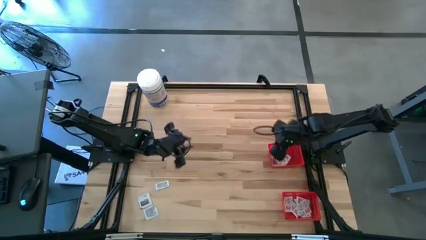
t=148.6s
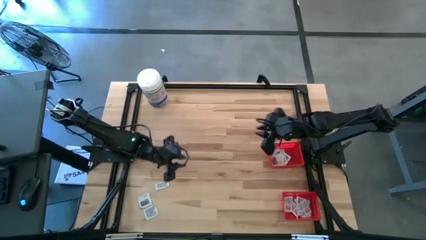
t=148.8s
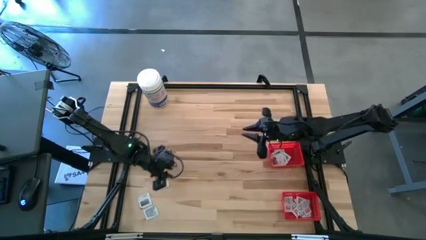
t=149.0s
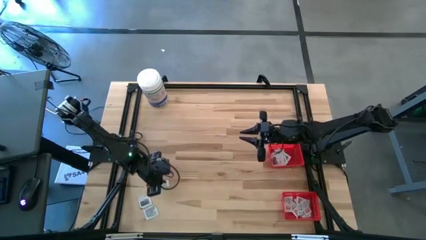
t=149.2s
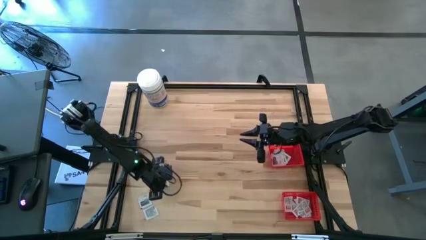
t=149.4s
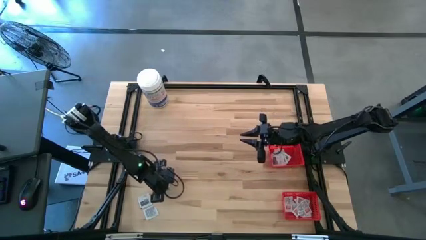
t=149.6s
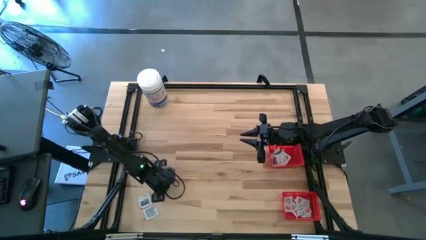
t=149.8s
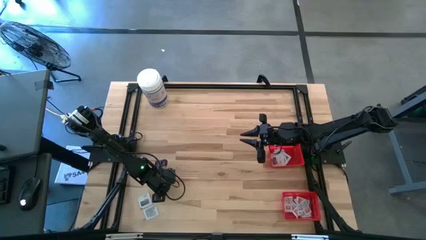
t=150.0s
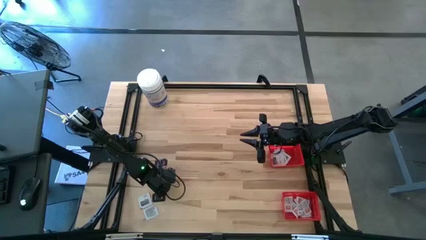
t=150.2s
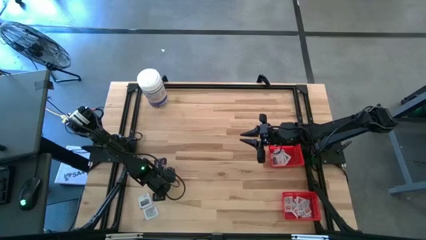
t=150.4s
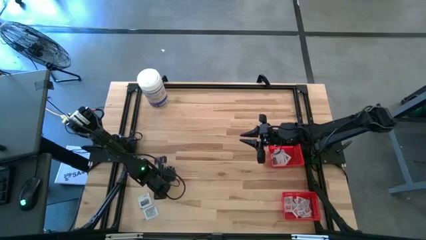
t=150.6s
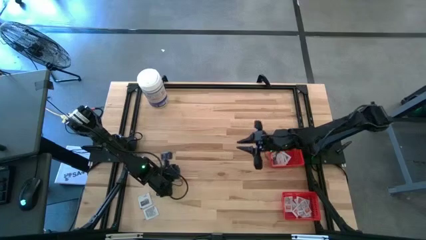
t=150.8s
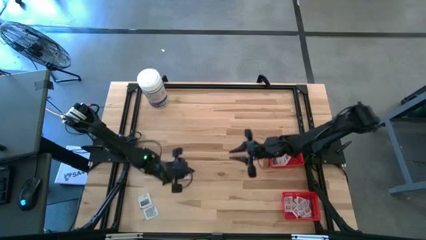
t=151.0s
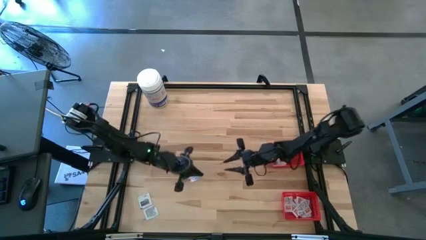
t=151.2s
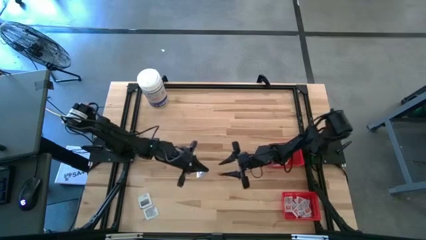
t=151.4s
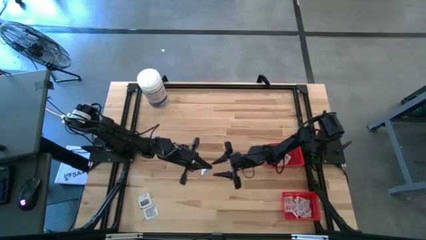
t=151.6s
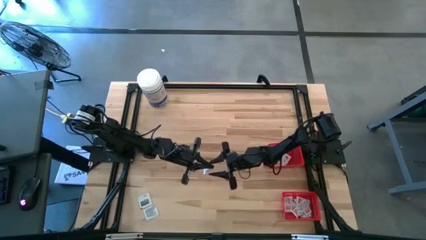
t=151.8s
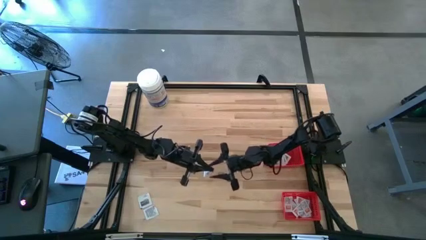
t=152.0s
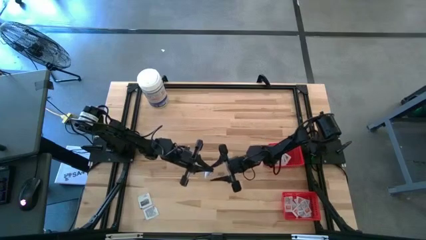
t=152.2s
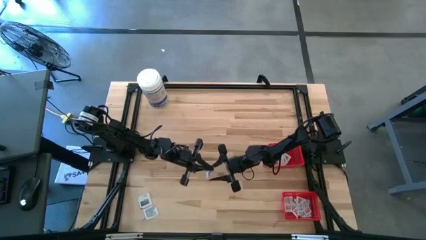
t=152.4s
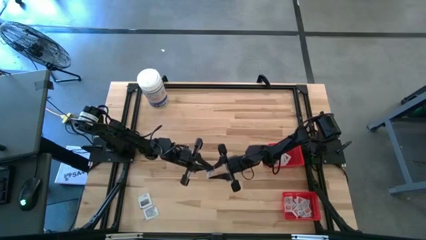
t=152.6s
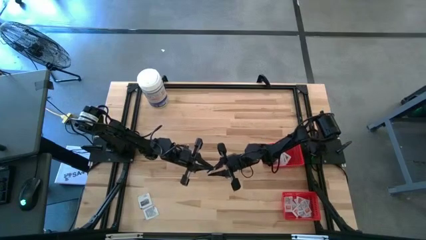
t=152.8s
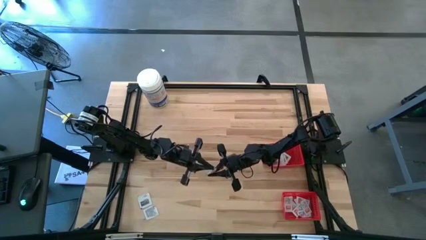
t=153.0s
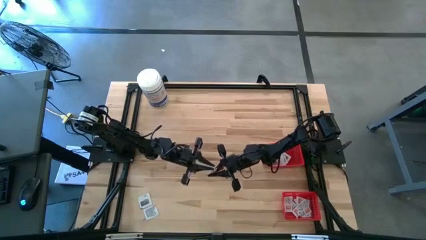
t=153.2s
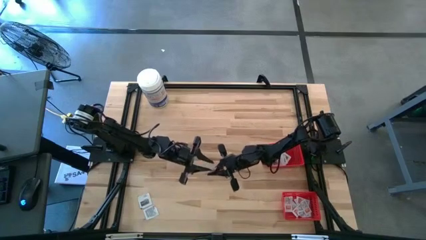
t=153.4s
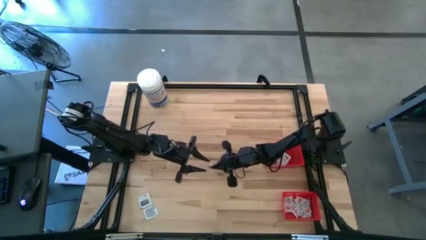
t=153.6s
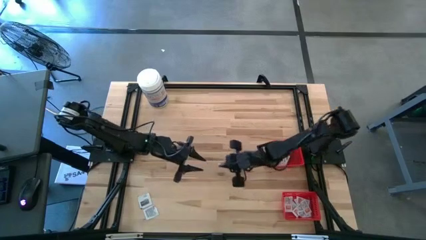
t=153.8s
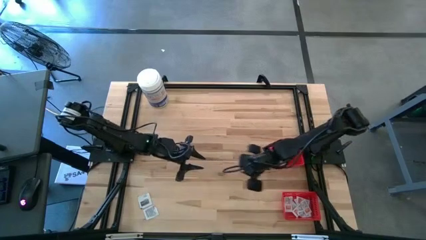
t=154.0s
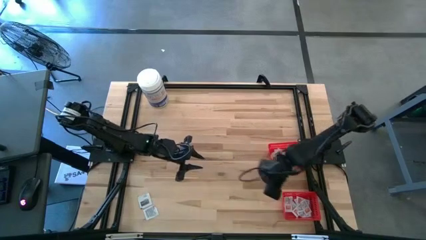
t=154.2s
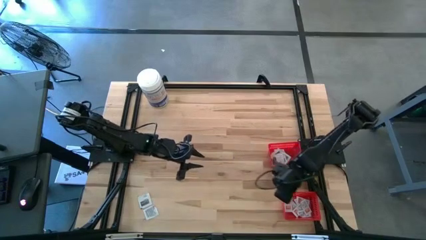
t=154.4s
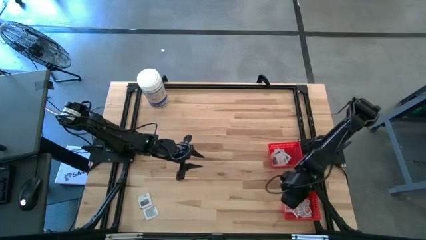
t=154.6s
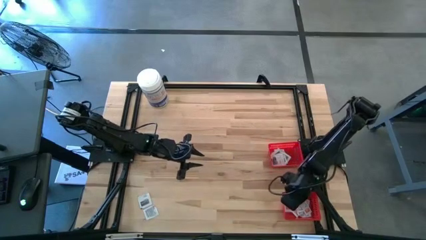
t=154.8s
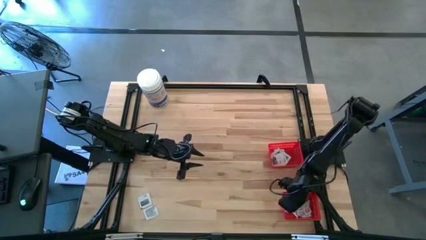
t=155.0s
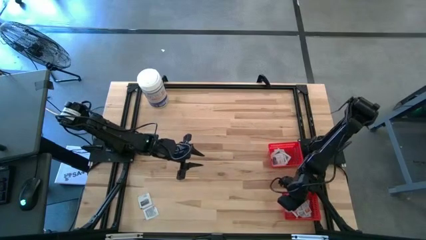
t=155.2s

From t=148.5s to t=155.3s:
Task: Pick & Place First Aid Supplies
Put the orange ointment pack into the bottom red basket

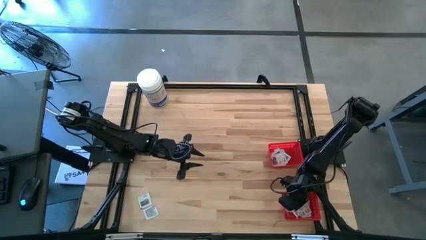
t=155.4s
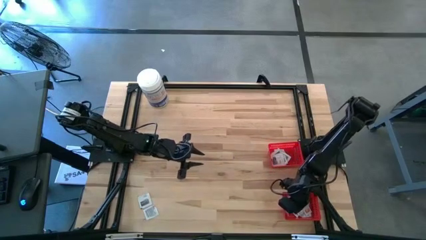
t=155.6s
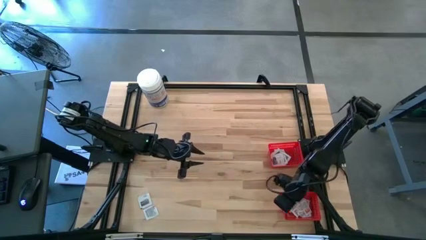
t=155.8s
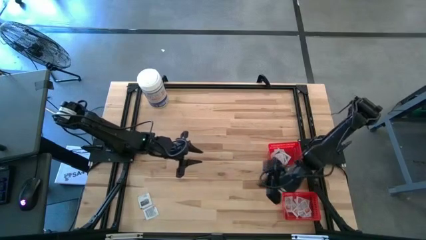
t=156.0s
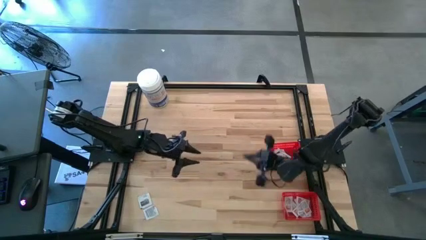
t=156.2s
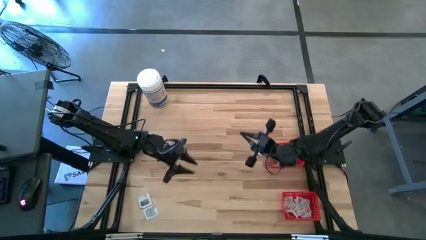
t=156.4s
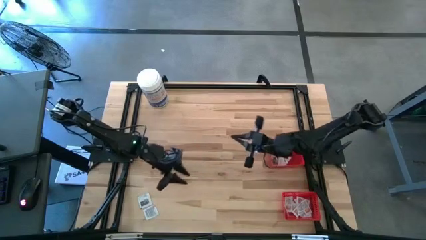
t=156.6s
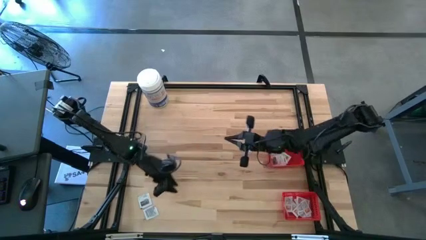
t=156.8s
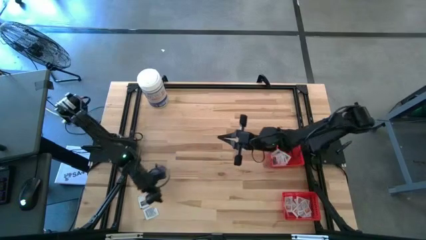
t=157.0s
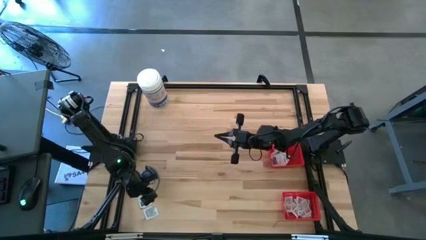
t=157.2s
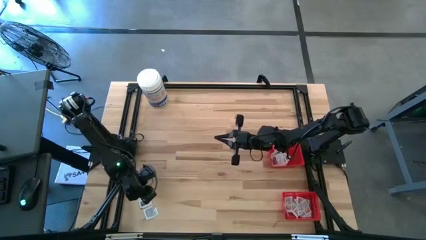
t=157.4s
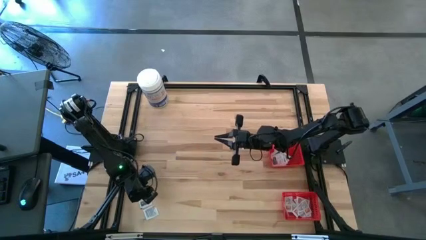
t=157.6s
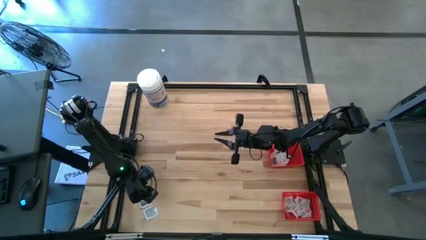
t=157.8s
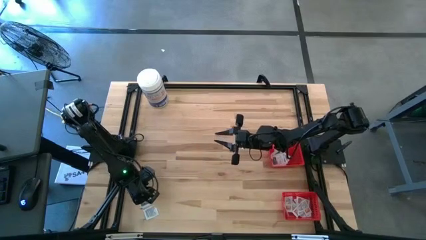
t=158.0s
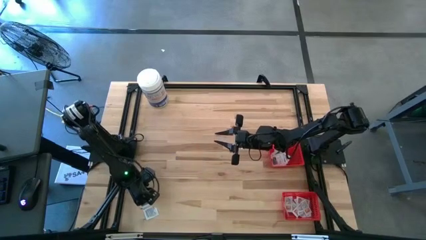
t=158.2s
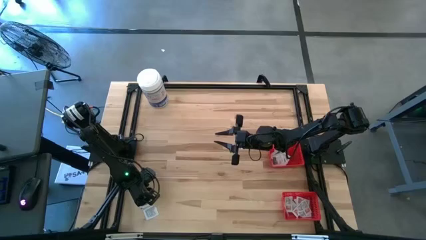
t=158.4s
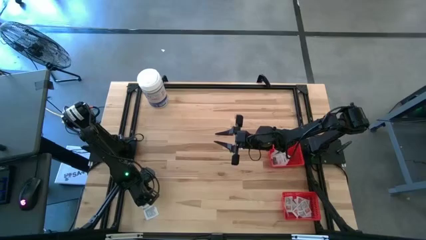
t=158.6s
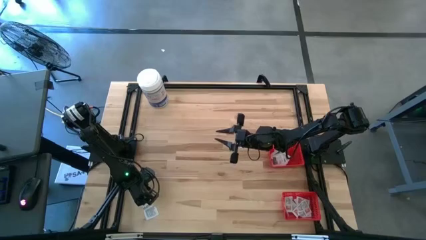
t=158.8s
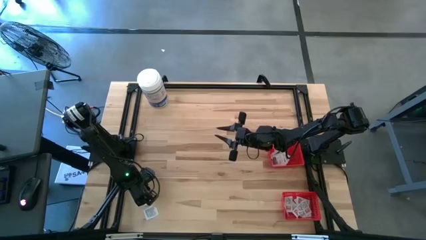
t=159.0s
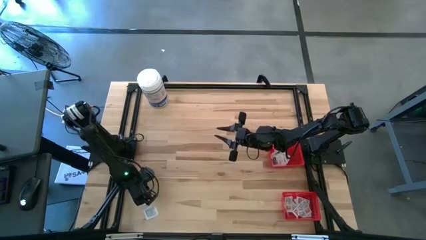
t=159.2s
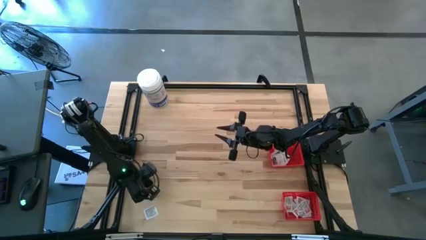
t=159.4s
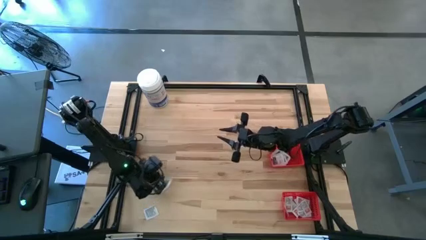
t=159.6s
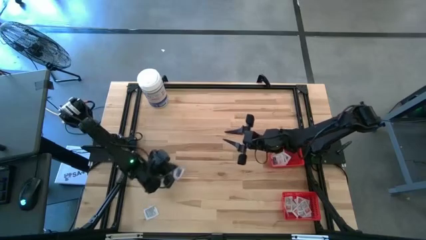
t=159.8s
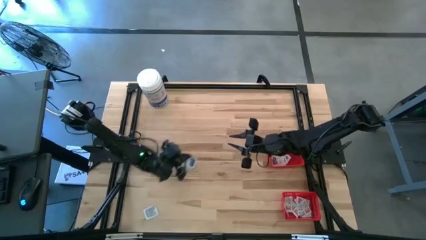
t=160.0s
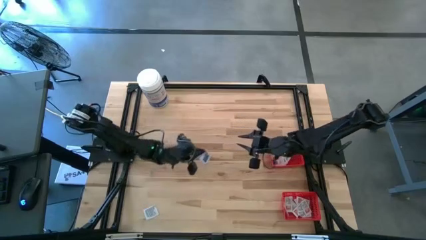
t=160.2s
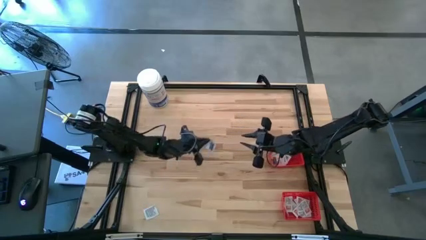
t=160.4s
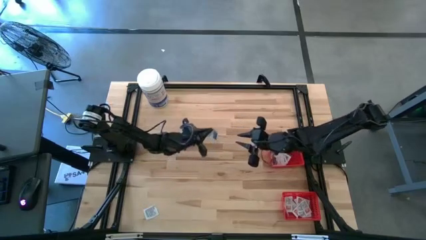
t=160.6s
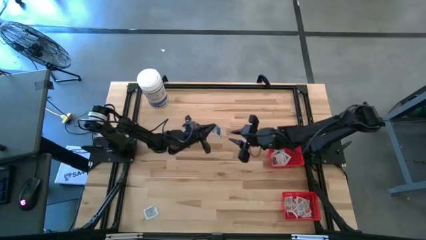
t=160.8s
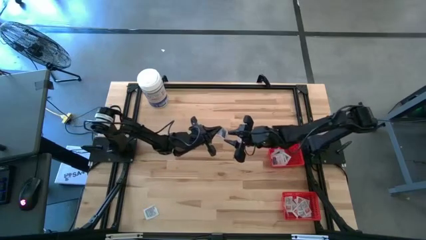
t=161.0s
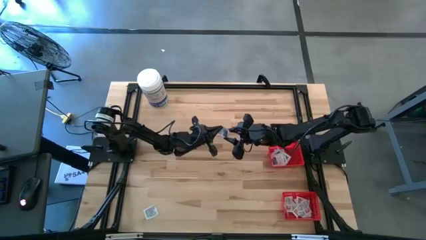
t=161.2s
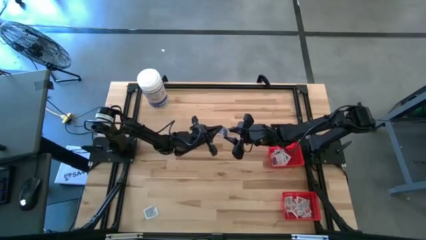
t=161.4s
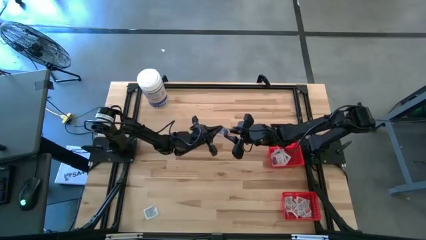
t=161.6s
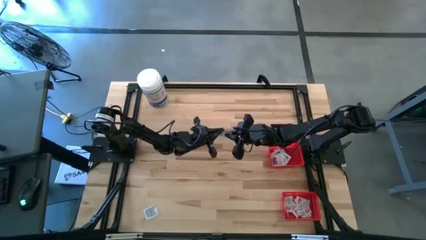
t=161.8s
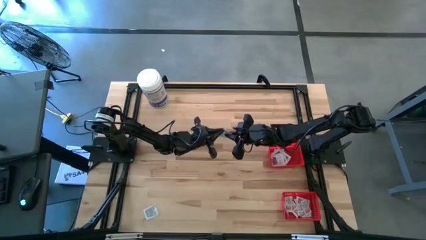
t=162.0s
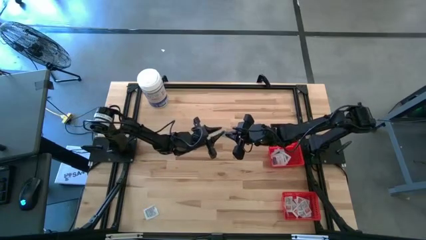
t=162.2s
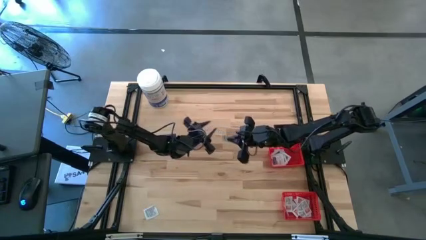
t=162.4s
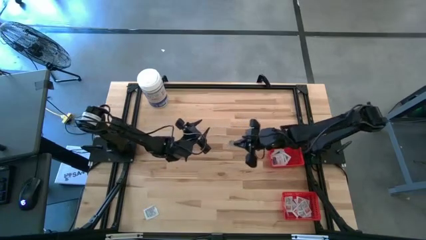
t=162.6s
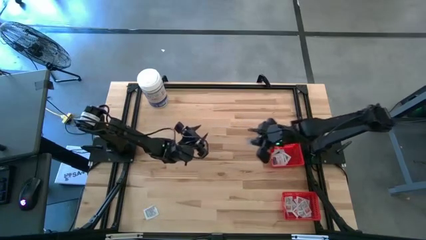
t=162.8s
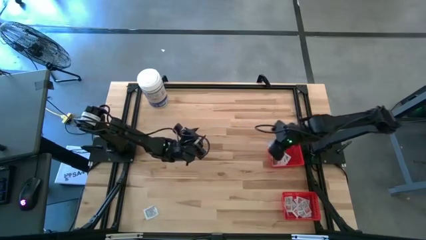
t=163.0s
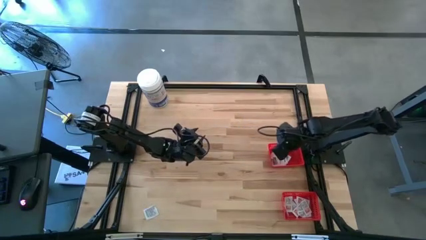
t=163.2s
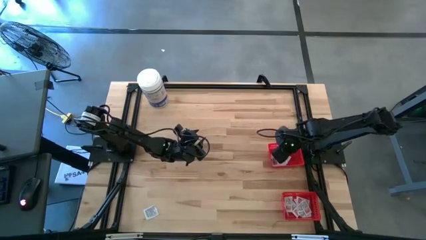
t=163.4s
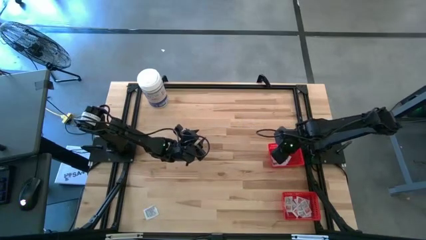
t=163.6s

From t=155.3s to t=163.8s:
Put the black towelette pack into the top red basket
